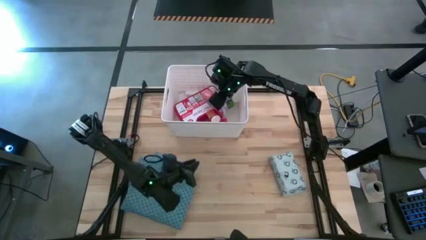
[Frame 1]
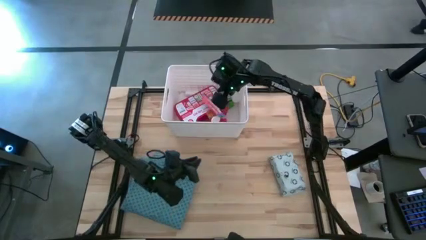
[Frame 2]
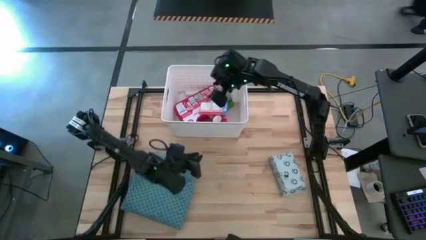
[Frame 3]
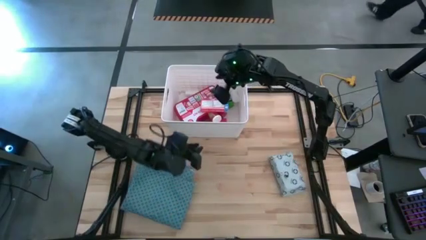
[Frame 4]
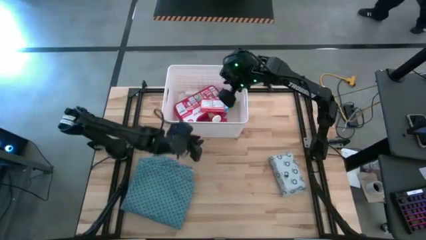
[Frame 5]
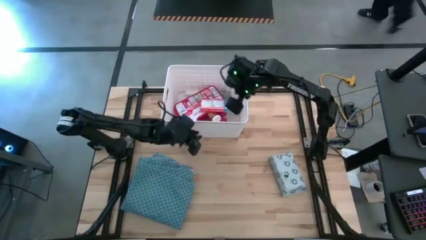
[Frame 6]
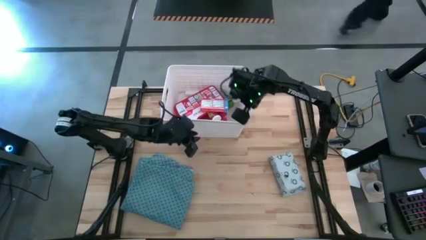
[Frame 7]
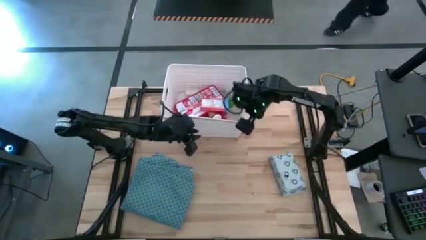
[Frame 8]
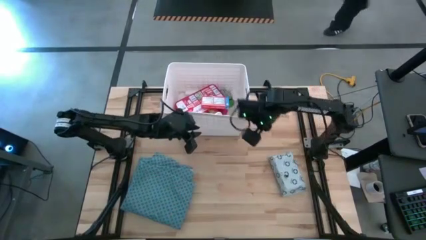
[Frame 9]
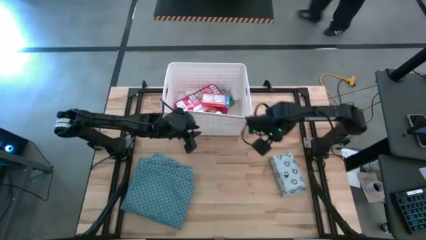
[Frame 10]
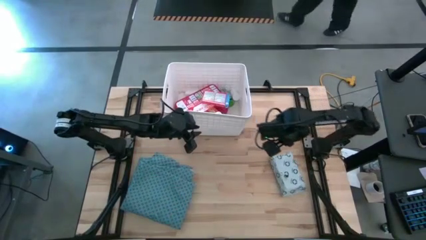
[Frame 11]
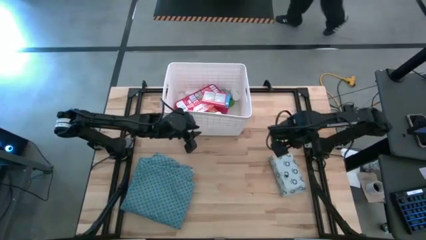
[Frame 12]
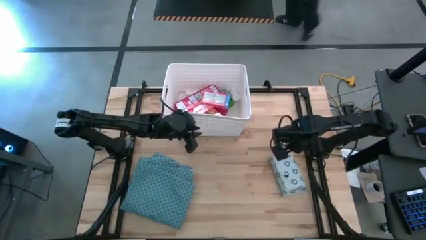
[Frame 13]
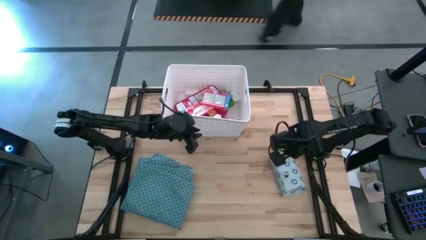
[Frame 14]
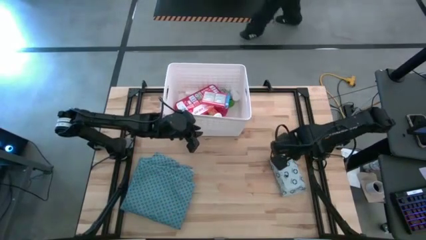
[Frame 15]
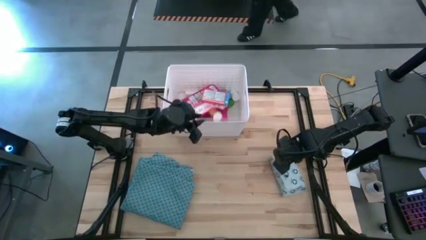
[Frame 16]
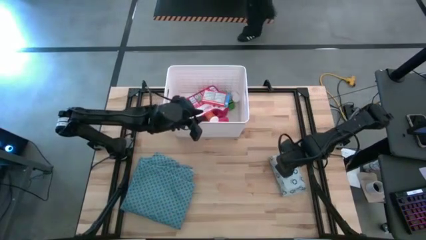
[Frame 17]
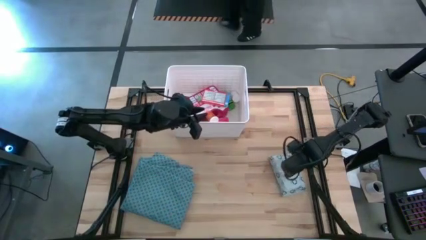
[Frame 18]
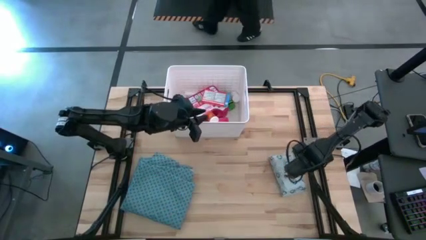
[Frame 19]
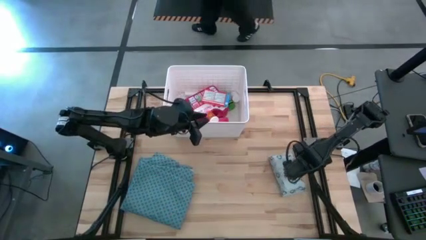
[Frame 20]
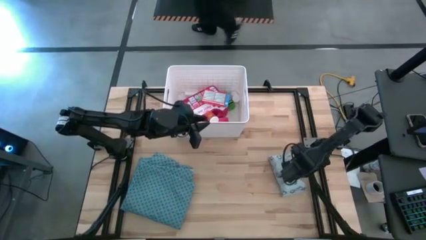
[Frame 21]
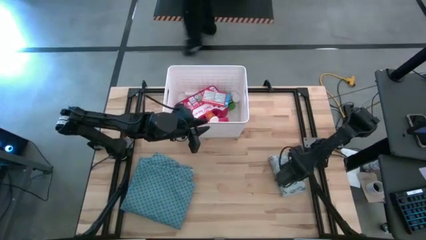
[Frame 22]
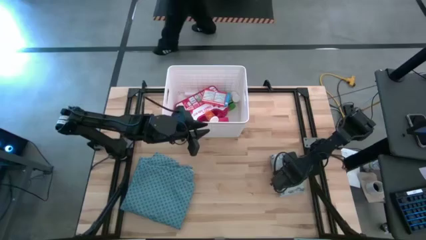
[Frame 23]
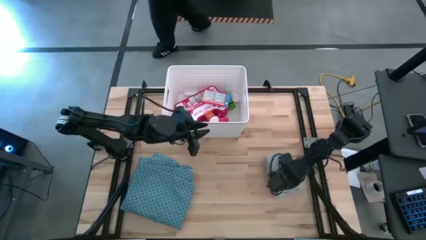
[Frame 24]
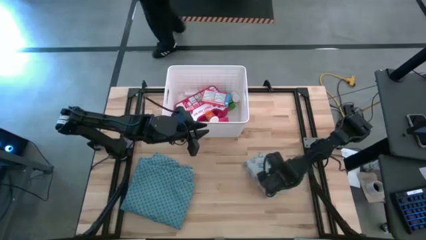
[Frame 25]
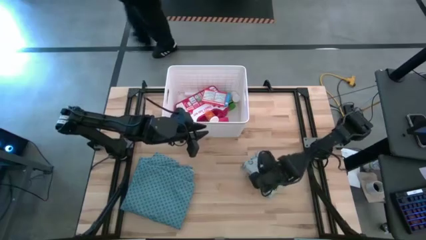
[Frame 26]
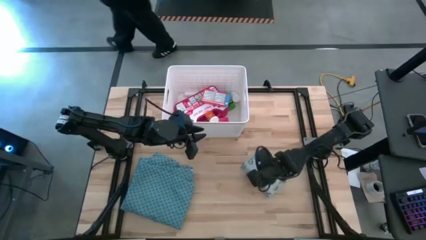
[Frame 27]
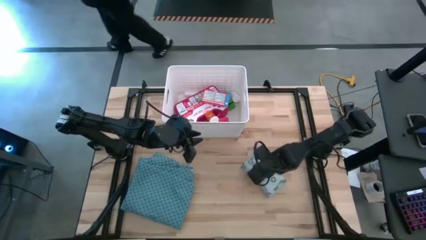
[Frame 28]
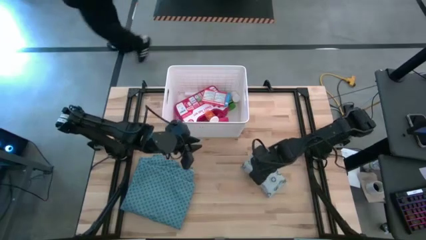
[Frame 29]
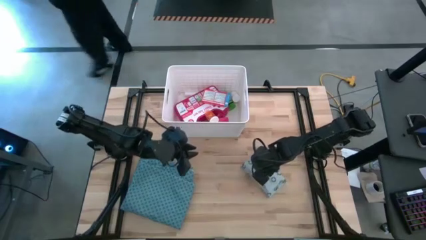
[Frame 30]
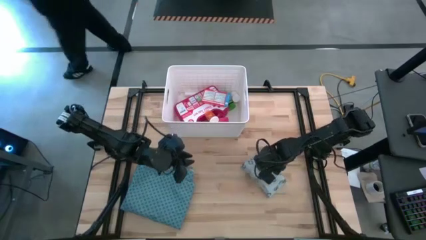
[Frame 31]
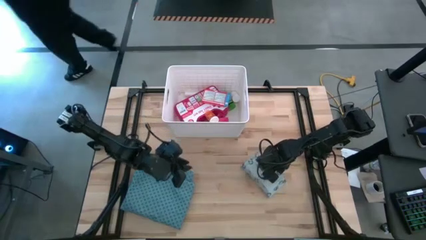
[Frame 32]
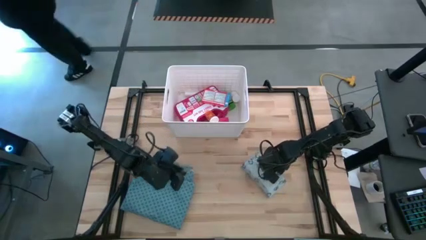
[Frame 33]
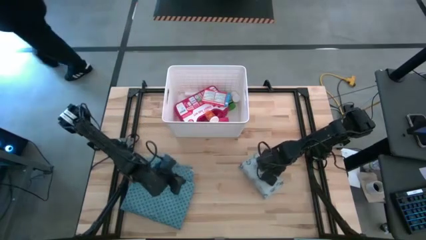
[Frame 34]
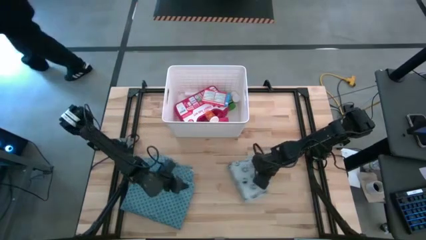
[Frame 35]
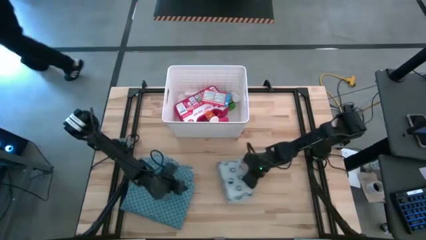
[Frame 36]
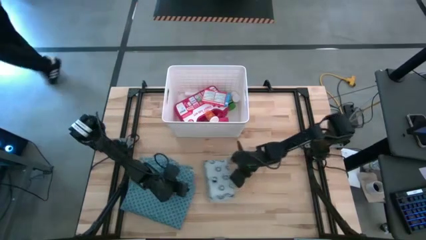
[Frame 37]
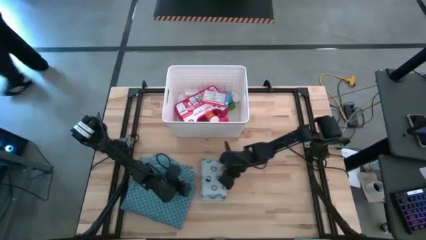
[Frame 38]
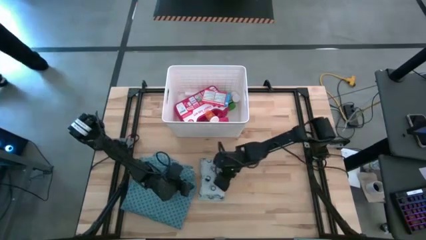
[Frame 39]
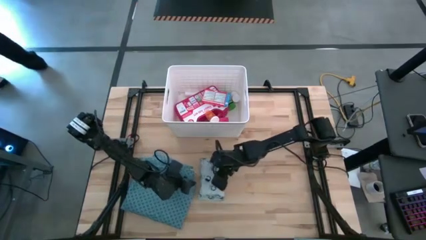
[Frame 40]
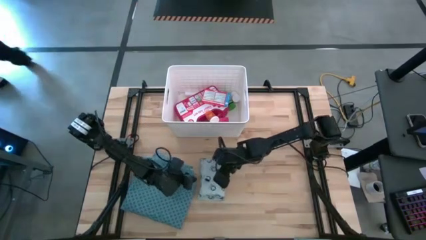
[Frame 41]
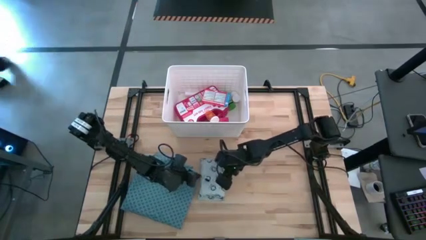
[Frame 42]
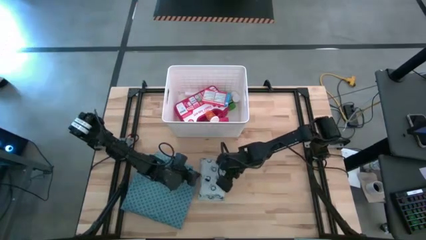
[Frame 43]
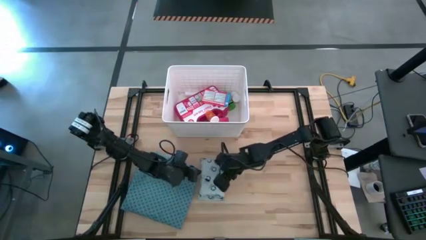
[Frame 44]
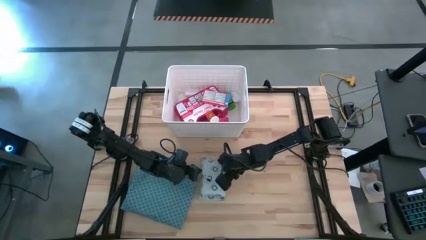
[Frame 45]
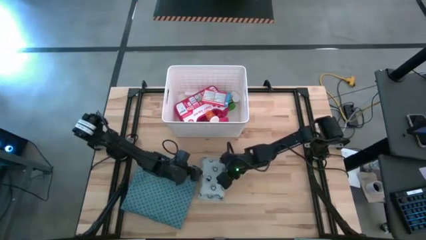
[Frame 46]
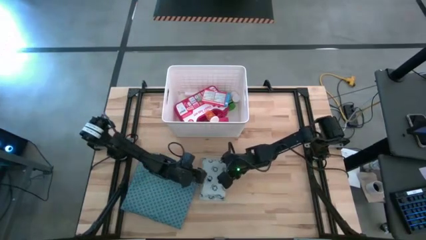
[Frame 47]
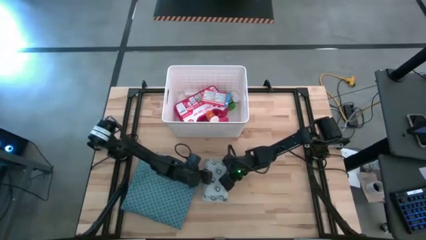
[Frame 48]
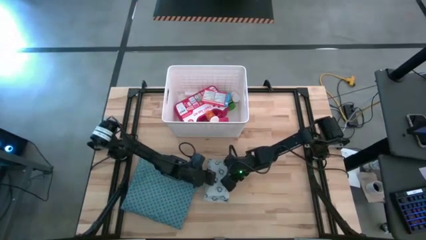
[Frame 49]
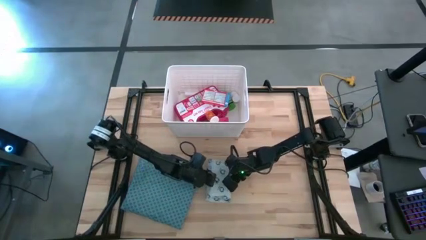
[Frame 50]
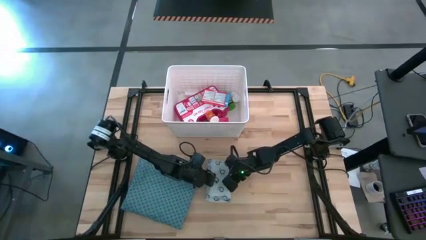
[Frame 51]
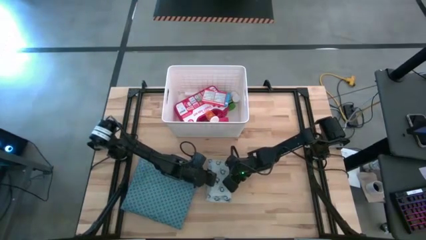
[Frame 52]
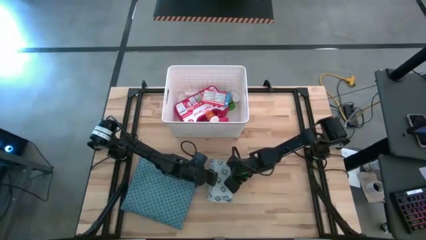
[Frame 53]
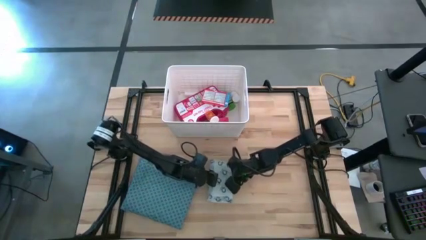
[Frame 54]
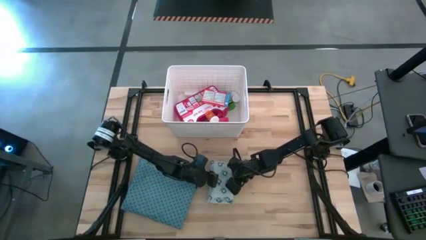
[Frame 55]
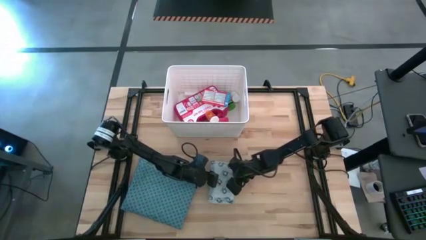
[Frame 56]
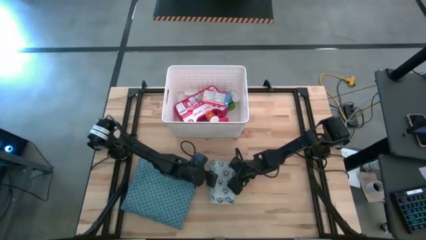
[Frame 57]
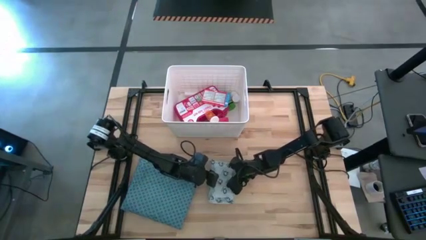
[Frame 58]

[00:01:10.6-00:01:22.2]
Task: Pick & place medical supplies in basket/bin
Put the light blue mailer bag into the white bin

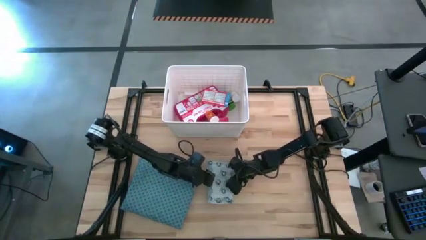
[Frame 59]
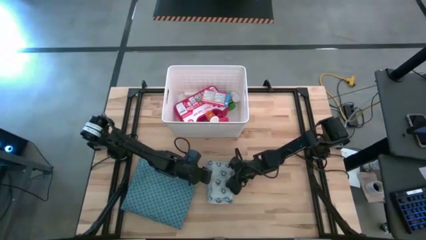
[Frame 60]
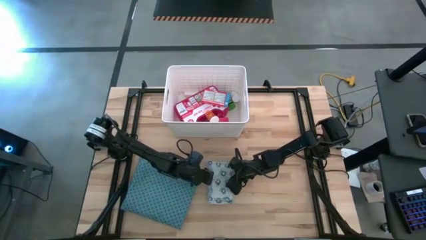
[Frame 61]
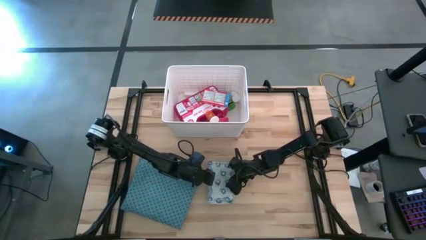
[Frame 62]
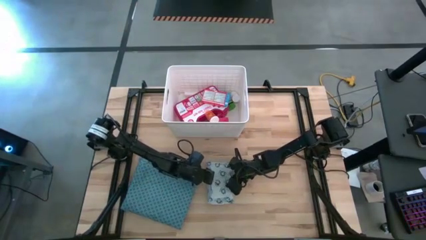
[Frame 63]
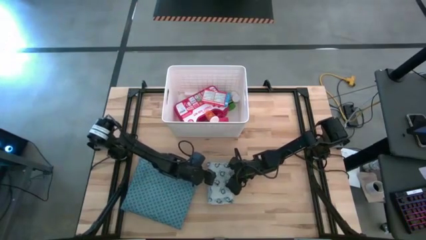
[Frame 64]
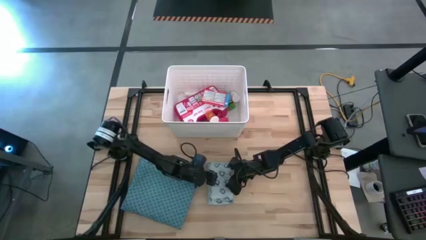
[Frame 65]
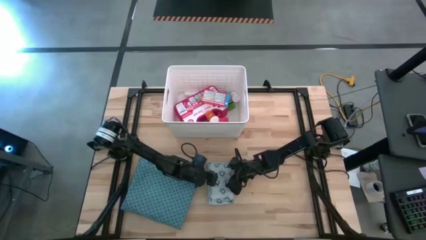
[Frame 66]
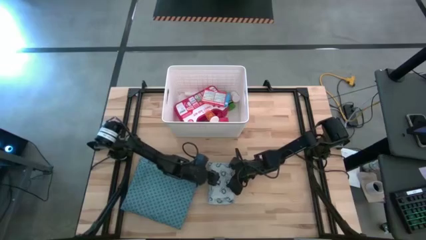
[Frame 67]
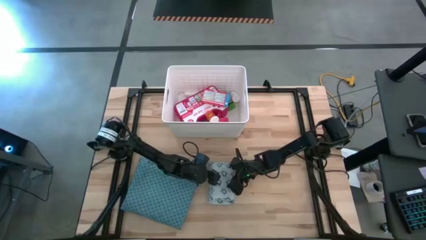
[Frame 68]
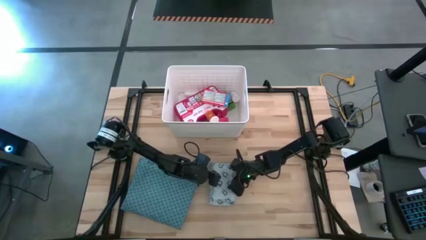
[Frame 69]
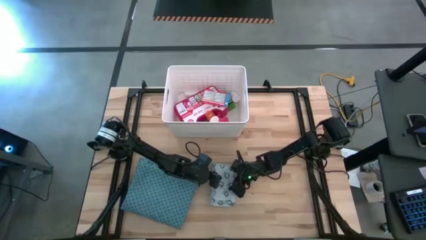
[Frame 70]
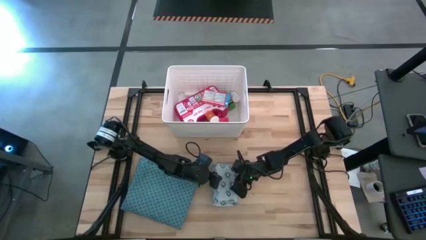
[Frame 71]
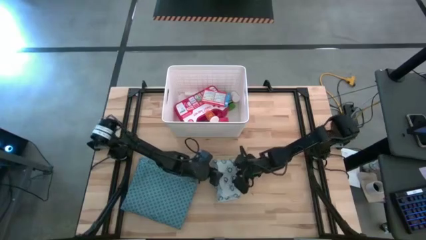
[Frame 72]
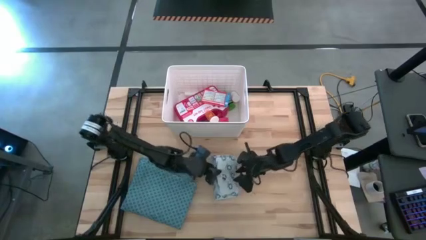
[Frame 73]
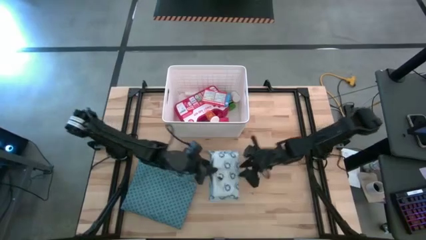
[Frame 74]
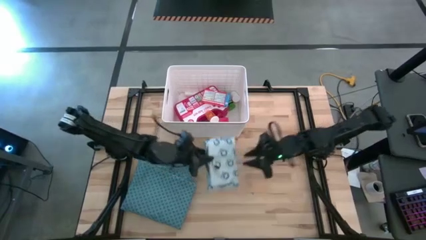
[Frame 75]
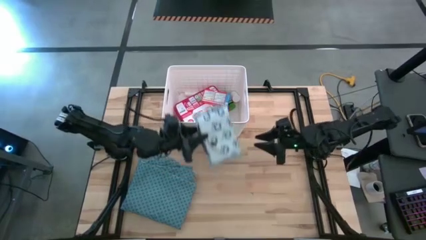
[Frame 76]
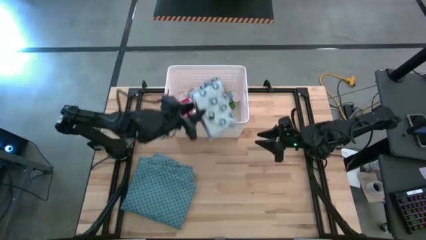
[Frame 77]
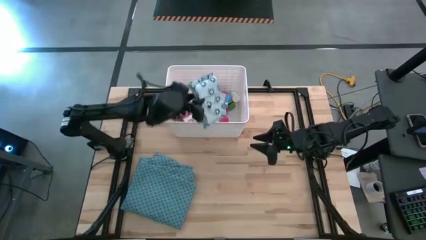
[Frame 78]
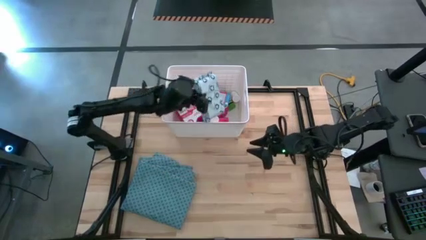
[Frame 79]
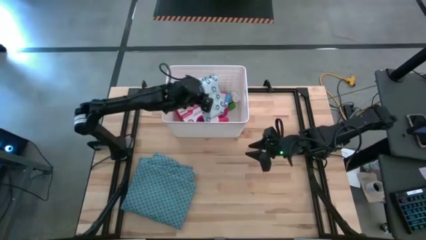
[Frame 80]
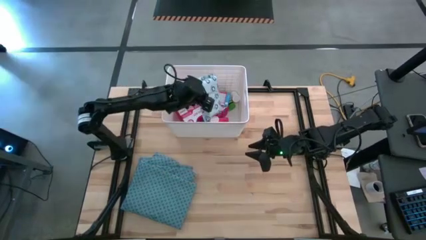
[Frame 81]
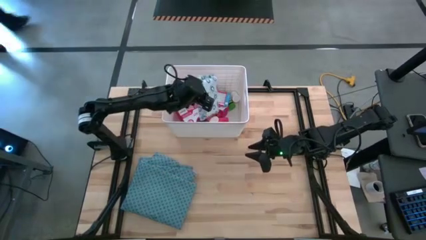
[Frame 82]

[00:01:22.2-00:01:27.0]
Put the light blue mailer bag into the white bin
